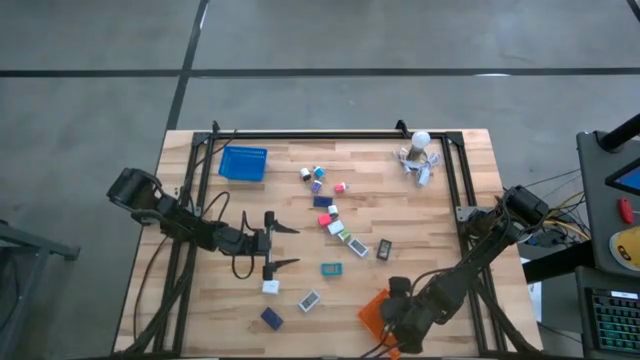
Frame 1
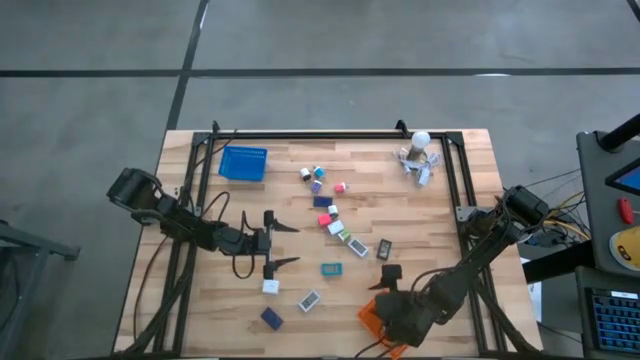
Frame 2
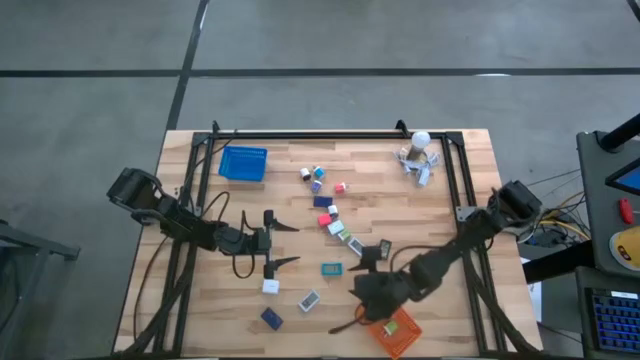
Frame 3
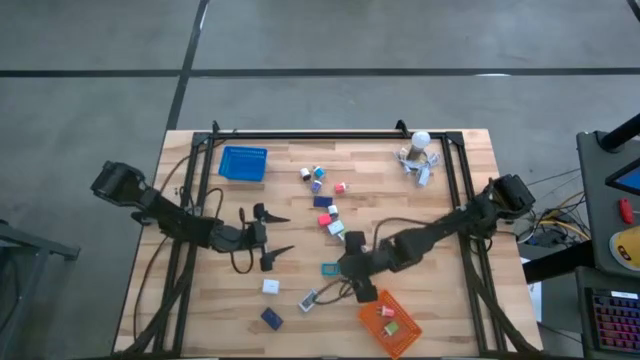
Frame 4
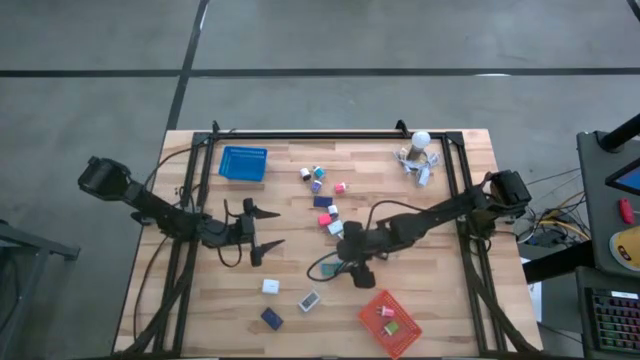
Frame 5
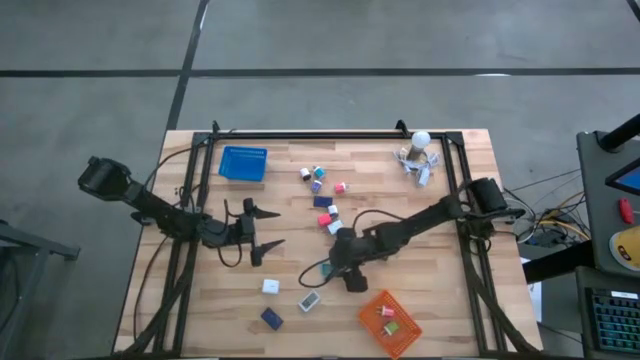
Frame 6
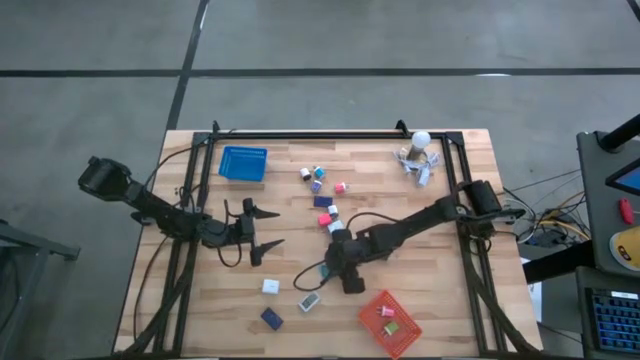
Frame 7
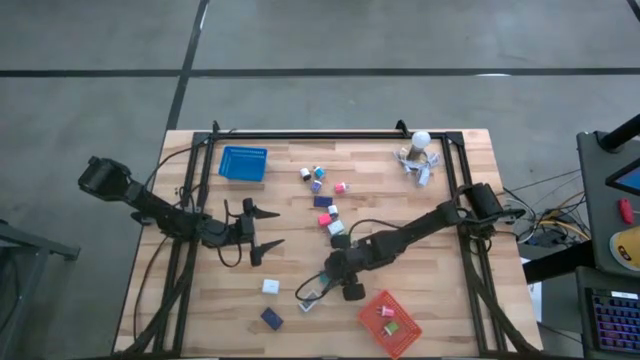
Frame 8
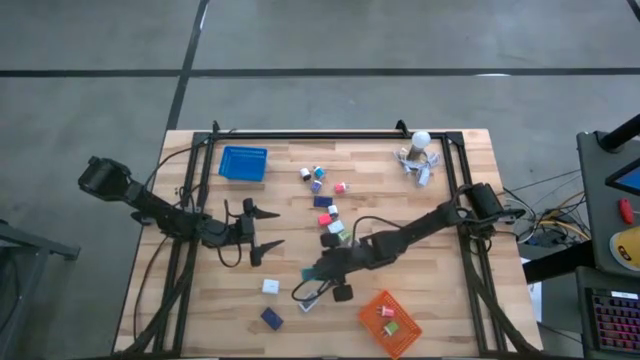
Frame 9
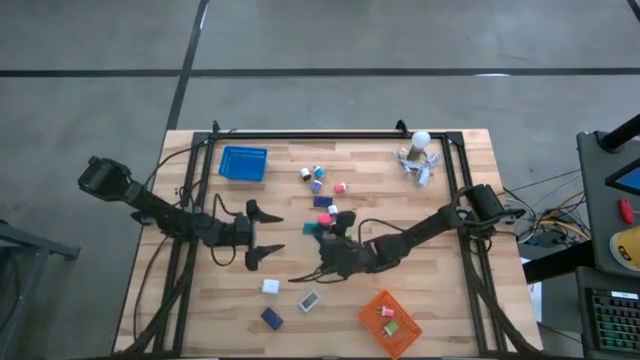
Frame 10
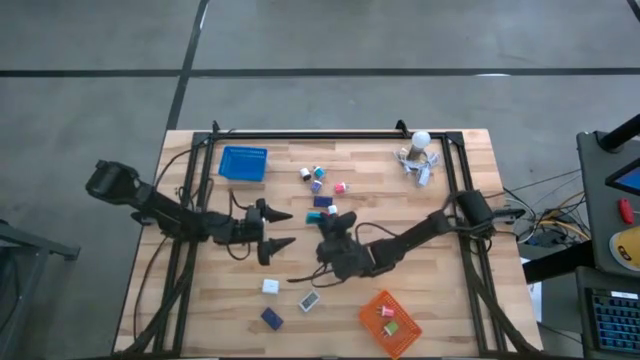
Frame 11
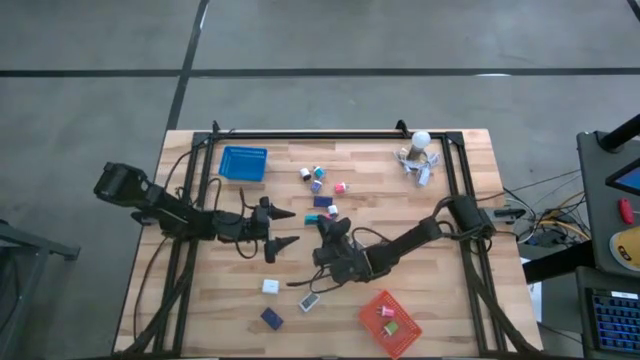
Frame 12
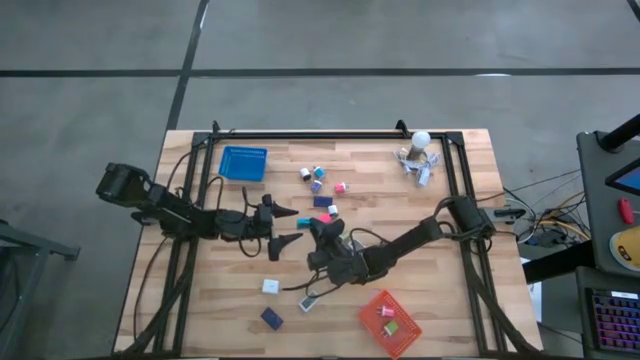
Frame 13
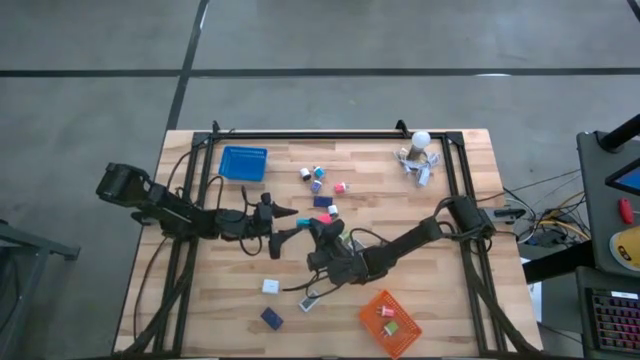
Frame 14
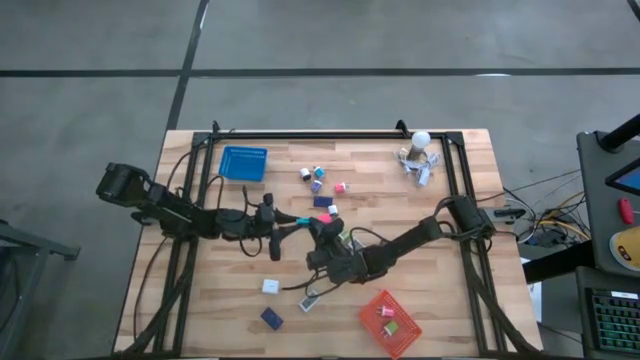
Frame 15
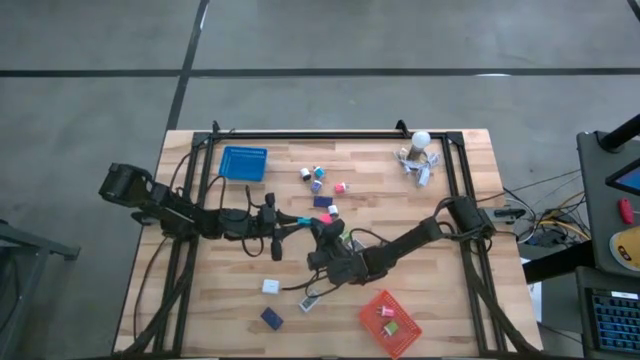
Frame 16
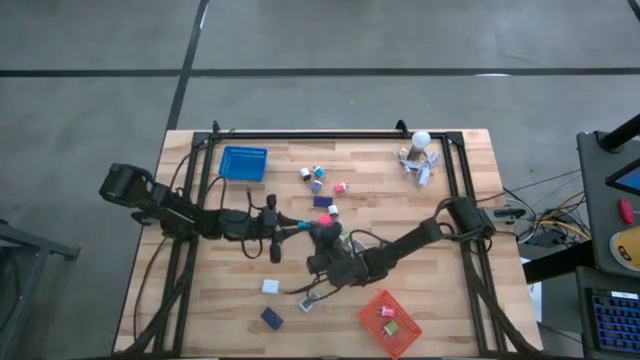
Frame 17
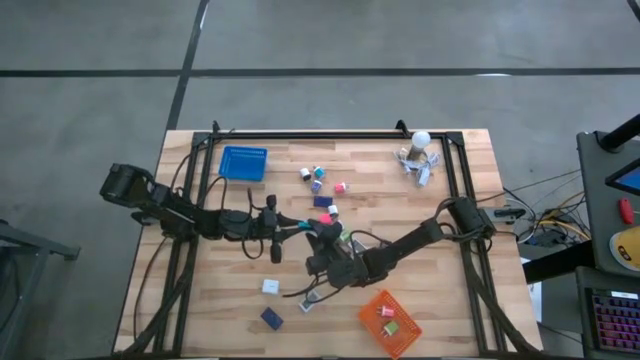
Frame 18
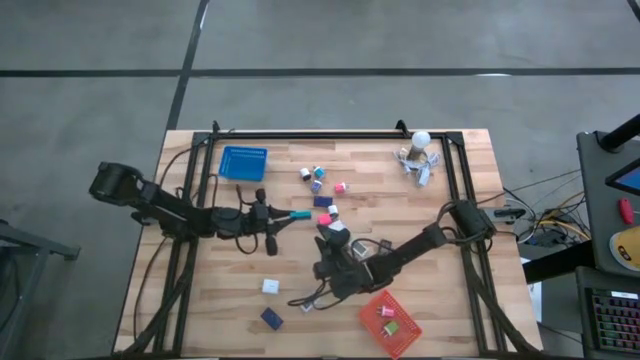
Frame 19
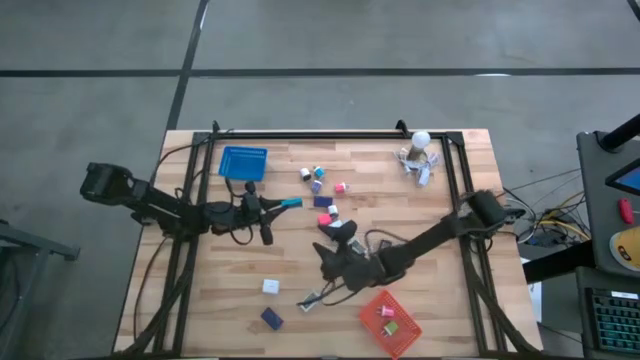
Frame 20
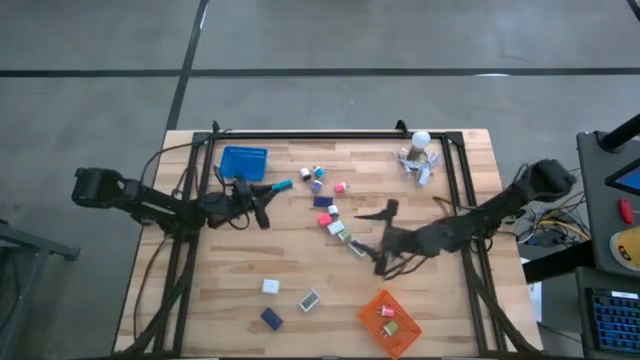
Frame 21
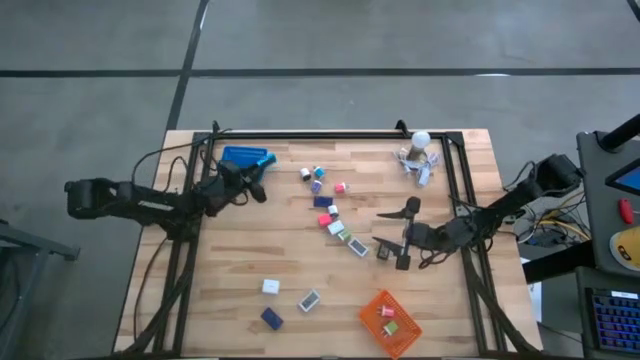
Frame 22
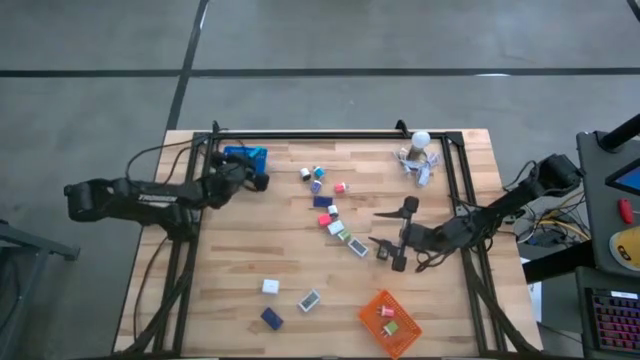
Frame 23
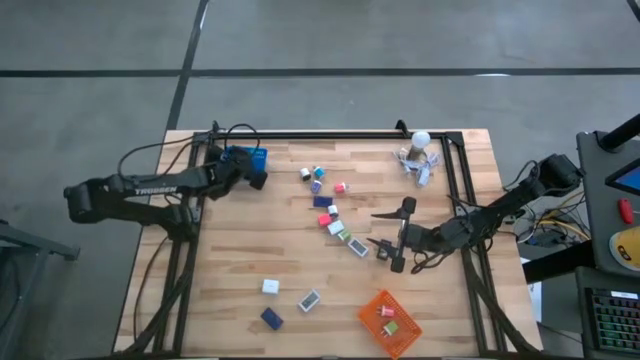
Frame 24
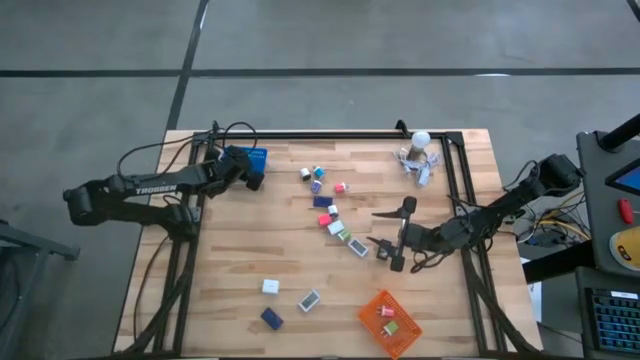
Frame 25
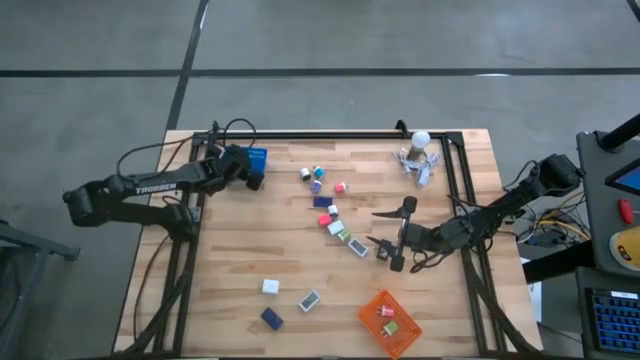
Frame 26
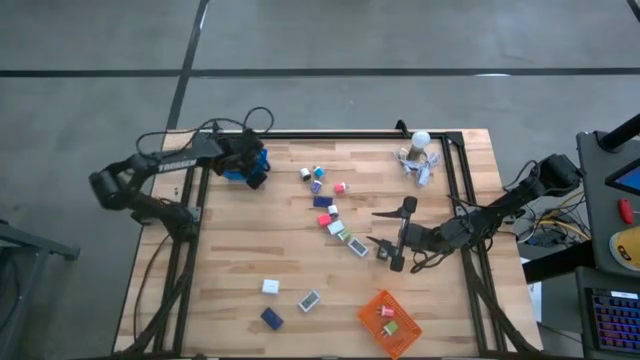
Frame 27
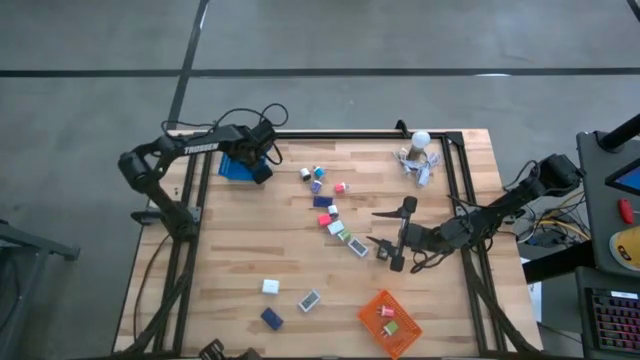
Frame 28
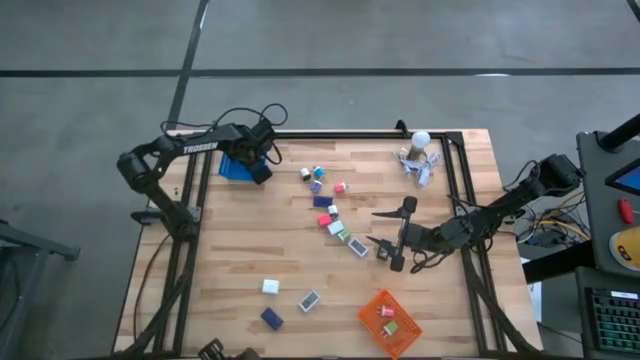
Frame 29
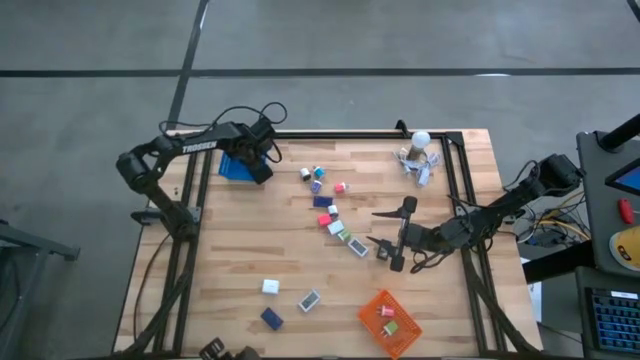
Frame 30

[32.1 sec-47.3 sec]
Task: Pick & Place Office items
Put the blue digital clock into the blue bin

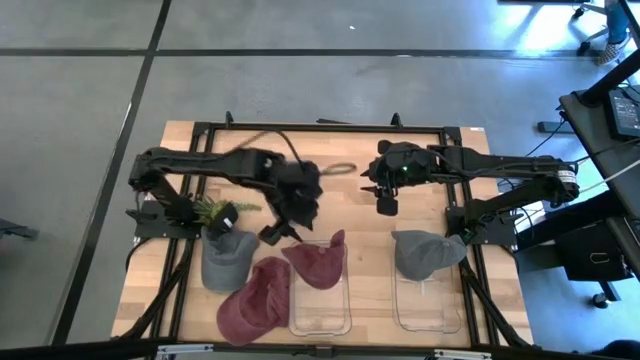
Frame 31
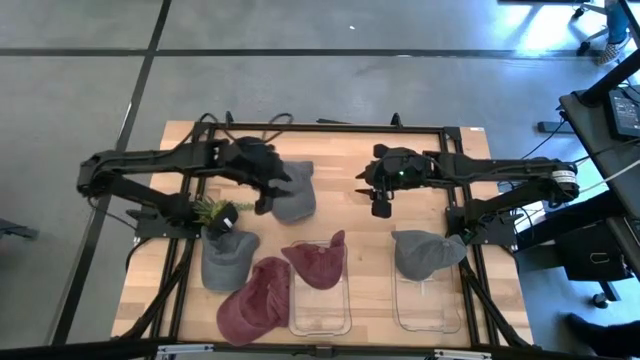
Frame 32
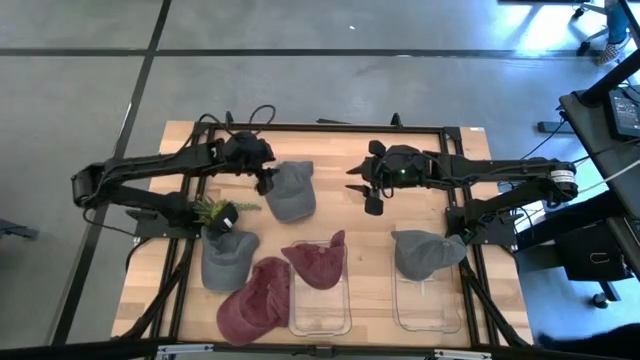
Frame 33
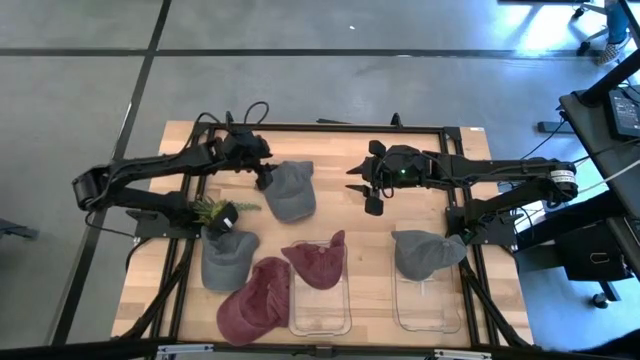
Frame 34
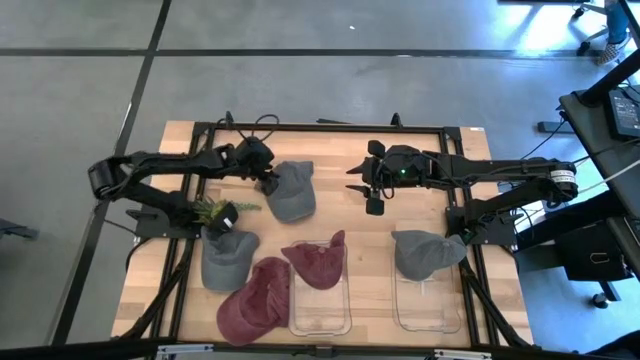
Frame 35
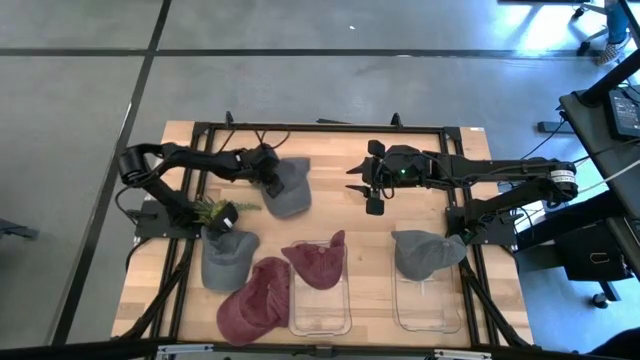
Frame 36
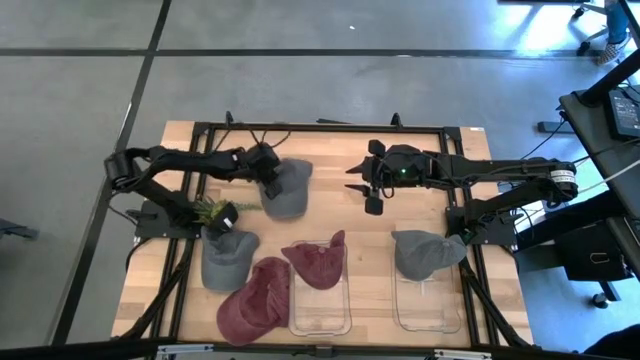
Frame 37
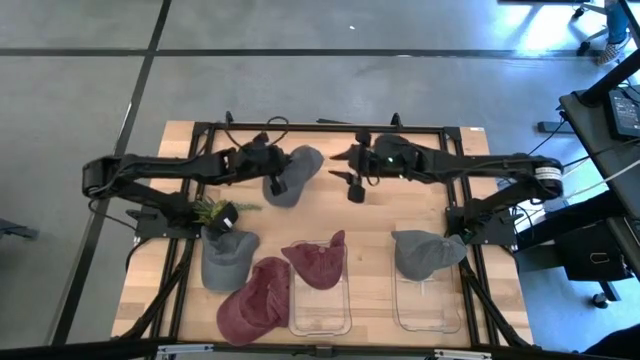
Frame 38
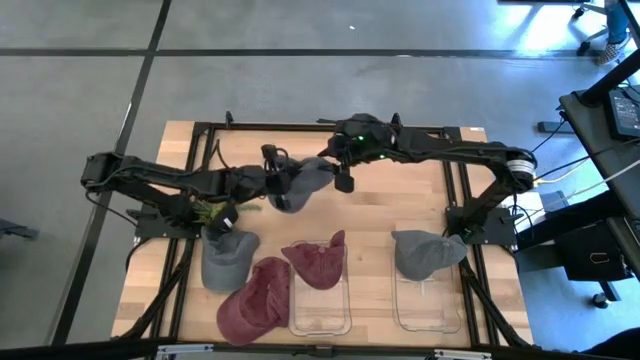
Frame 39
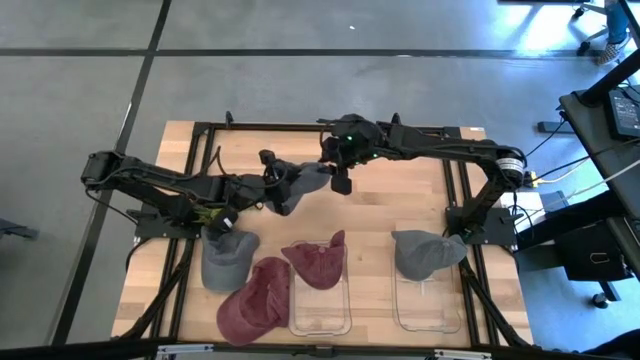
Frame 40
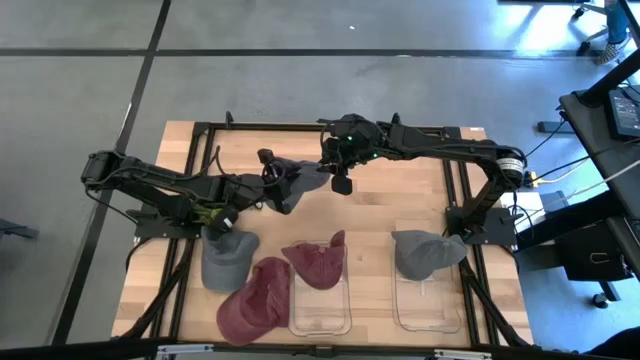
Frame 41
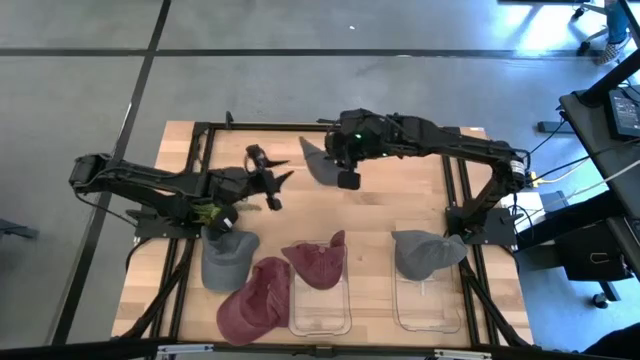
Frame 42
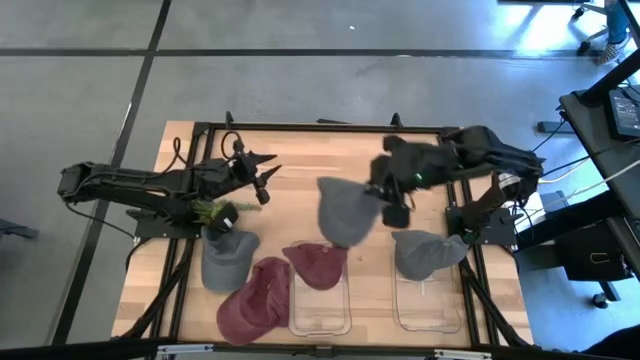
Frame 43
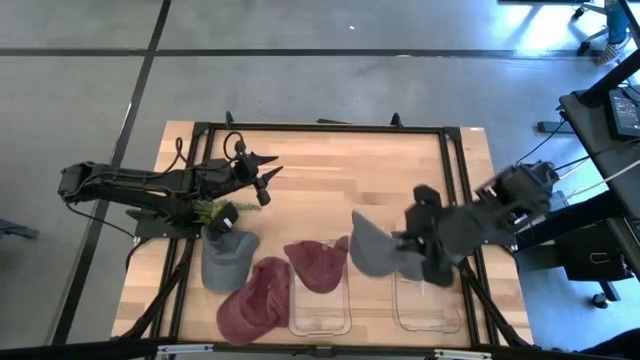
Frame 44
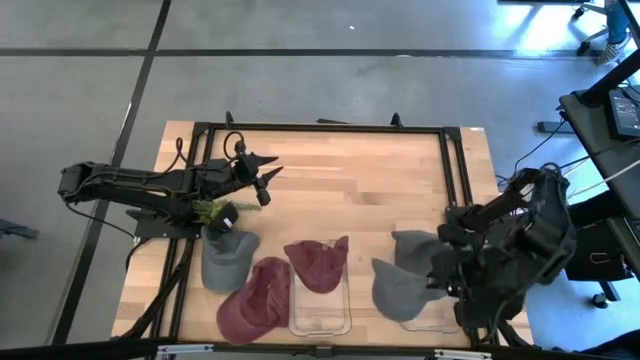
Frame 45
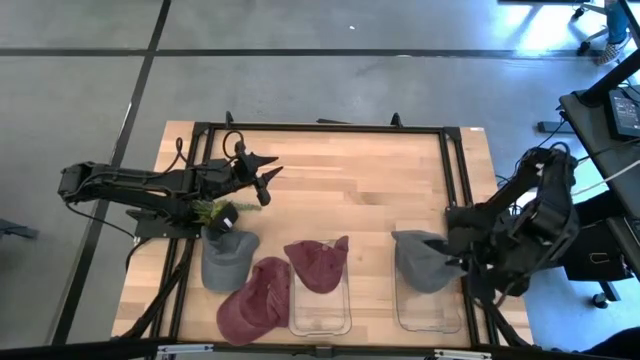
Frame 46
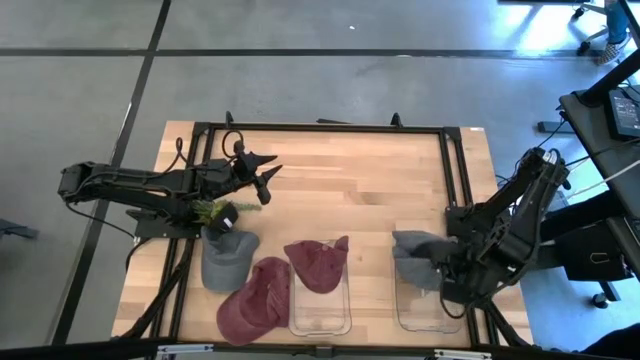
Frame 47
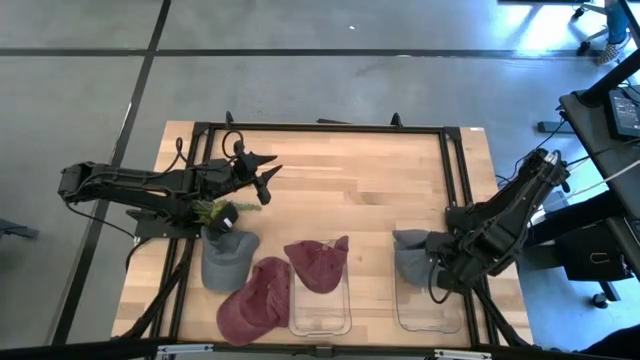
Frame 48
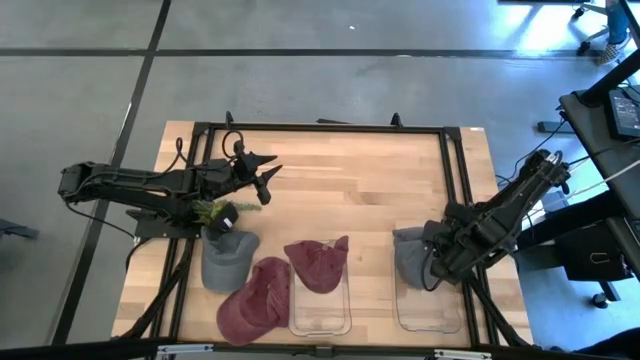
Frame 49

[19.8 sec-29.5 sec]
Task: Pick & Place hat
Put the top gray cap into the right transparent bin
